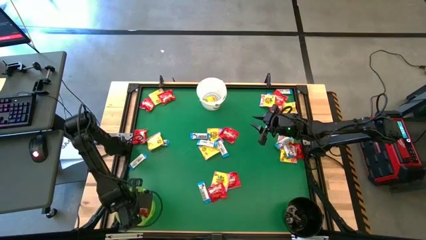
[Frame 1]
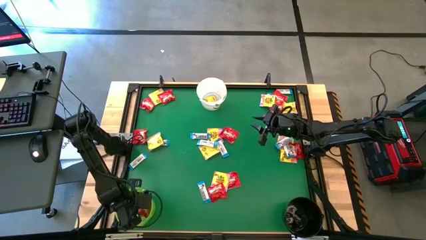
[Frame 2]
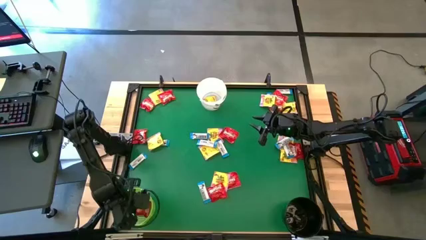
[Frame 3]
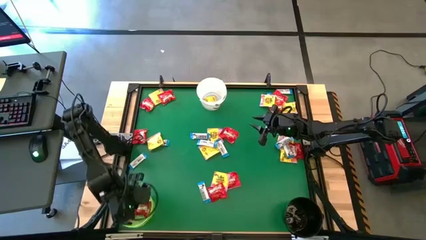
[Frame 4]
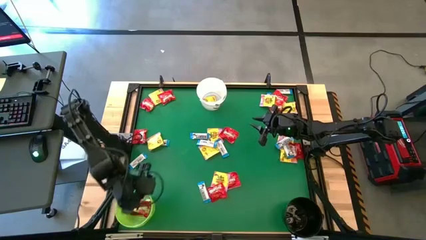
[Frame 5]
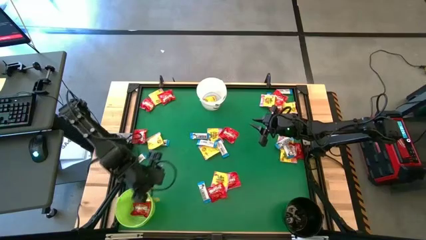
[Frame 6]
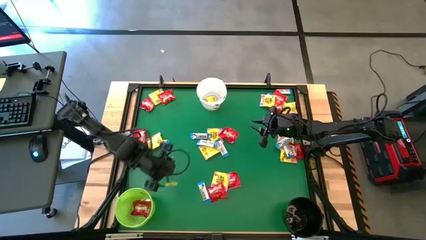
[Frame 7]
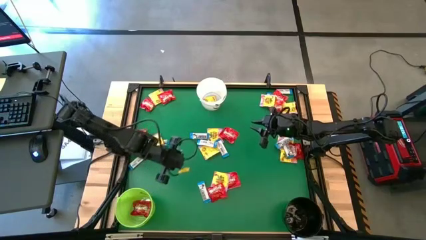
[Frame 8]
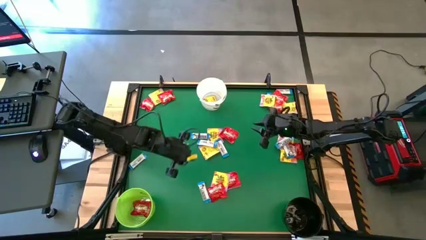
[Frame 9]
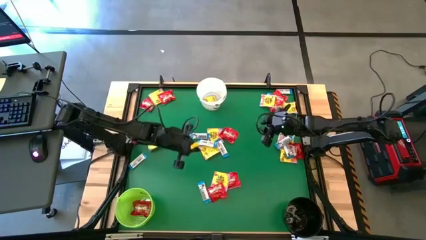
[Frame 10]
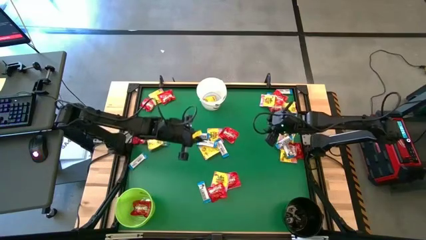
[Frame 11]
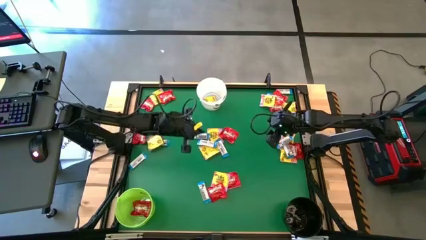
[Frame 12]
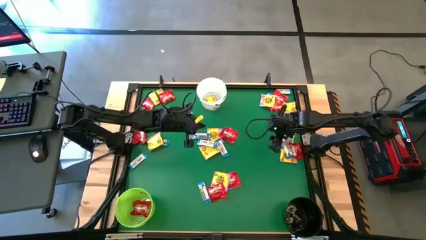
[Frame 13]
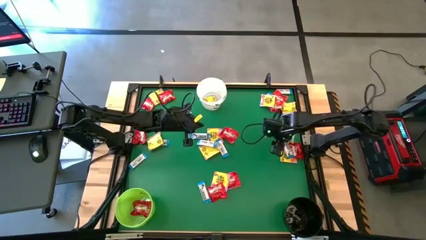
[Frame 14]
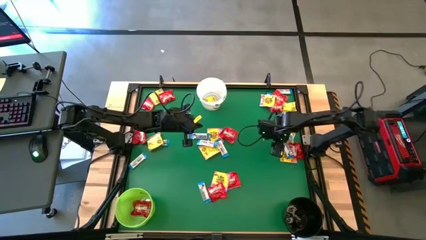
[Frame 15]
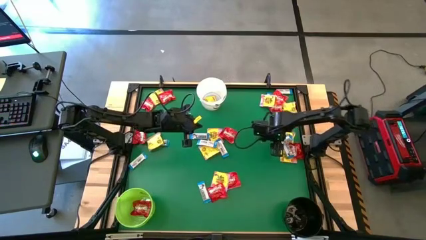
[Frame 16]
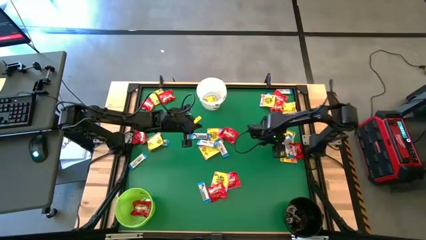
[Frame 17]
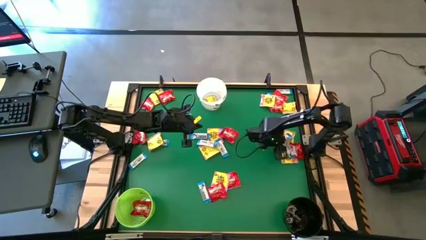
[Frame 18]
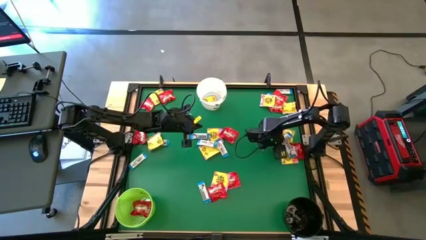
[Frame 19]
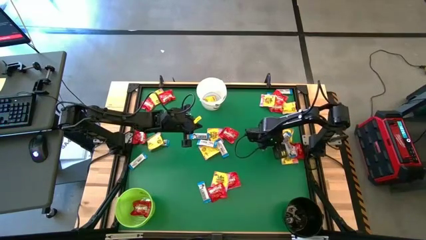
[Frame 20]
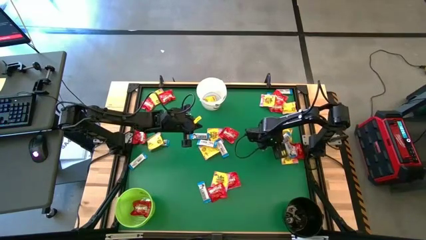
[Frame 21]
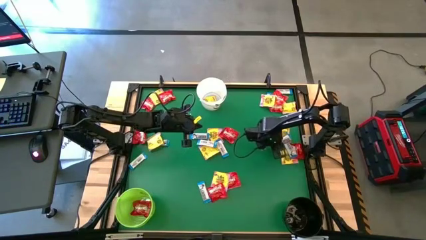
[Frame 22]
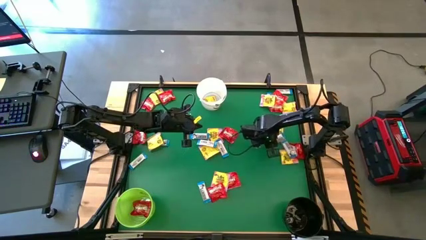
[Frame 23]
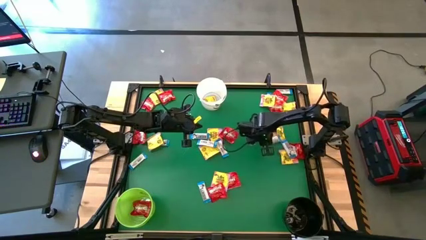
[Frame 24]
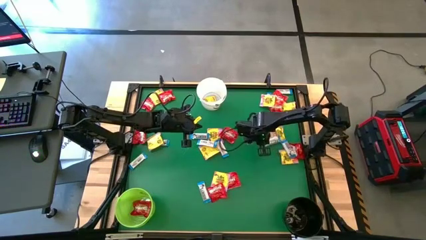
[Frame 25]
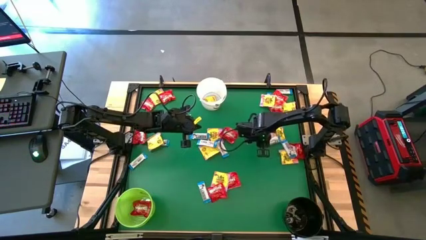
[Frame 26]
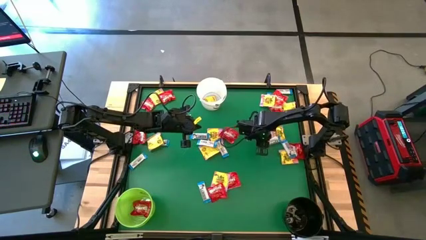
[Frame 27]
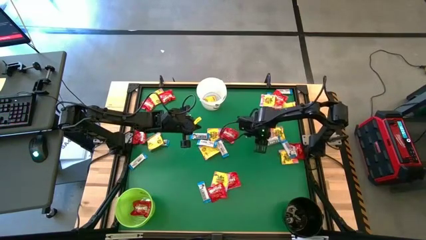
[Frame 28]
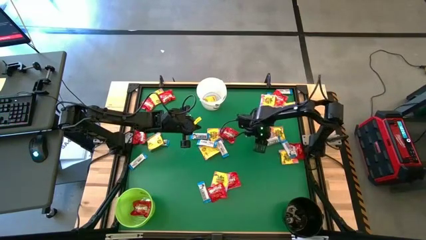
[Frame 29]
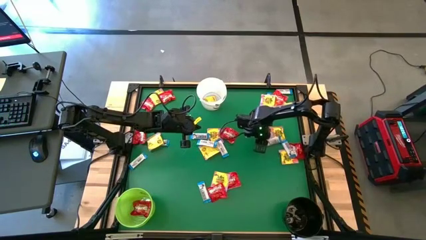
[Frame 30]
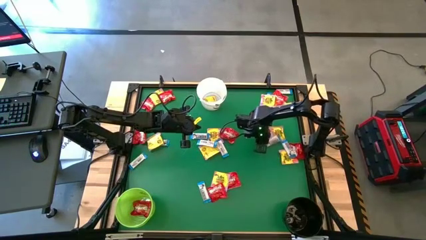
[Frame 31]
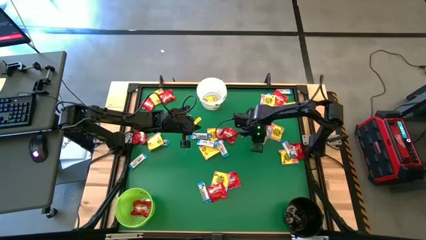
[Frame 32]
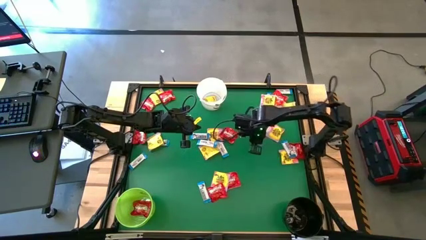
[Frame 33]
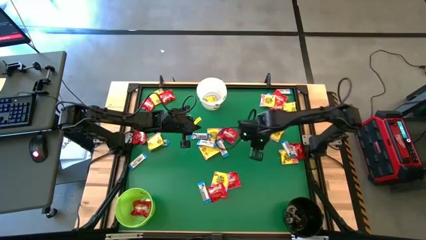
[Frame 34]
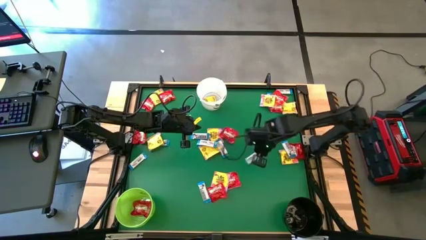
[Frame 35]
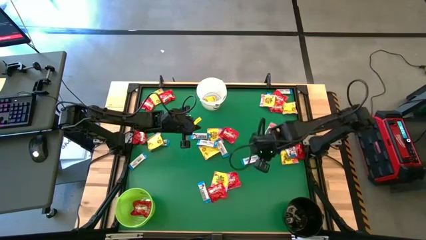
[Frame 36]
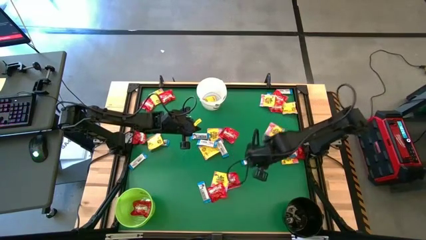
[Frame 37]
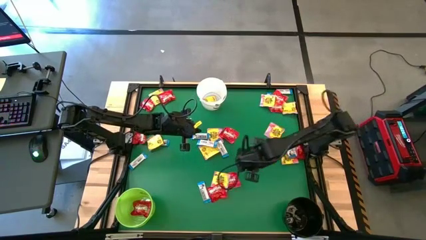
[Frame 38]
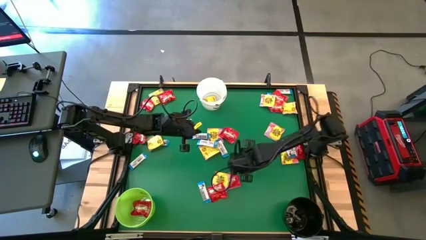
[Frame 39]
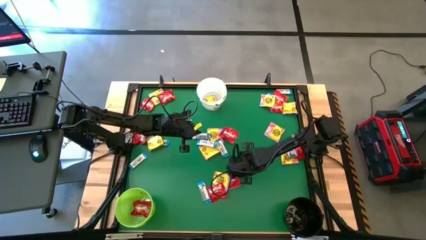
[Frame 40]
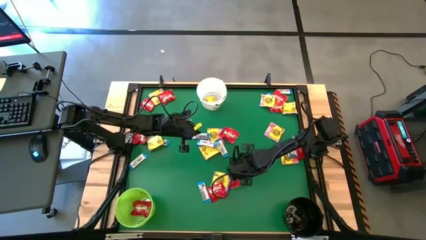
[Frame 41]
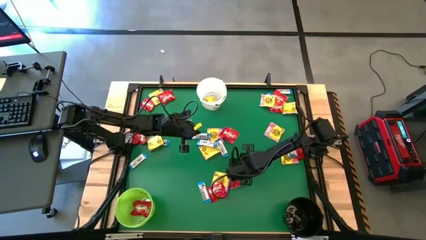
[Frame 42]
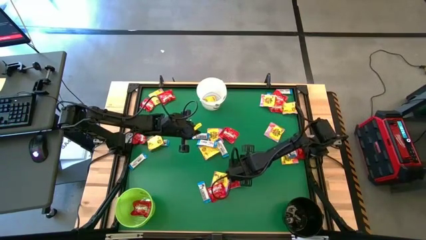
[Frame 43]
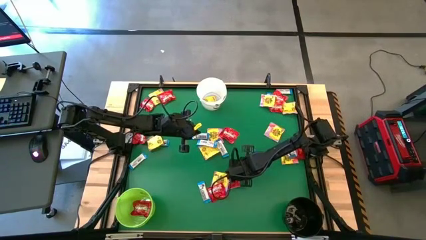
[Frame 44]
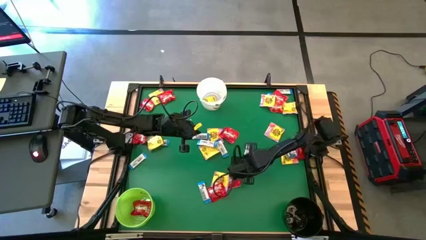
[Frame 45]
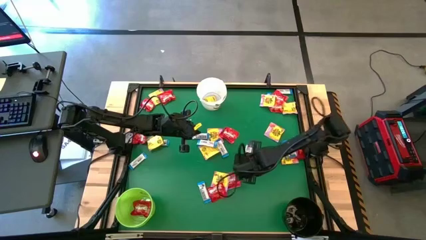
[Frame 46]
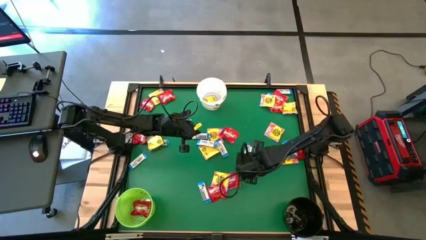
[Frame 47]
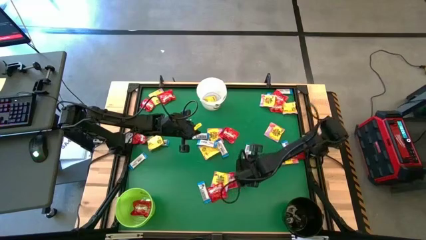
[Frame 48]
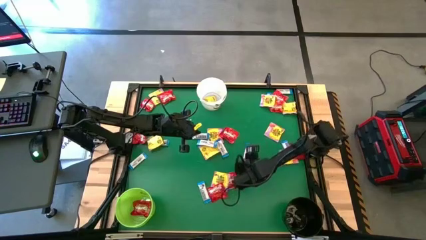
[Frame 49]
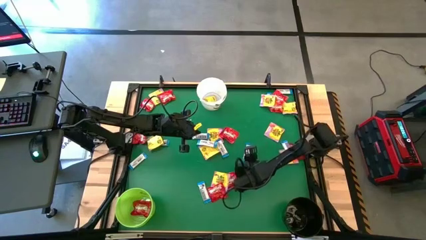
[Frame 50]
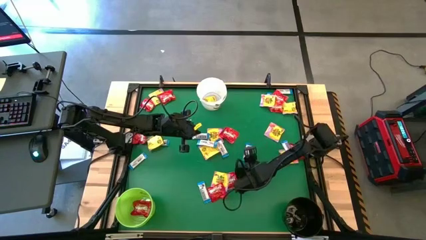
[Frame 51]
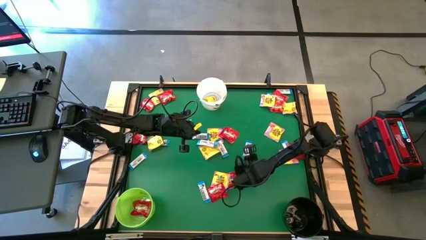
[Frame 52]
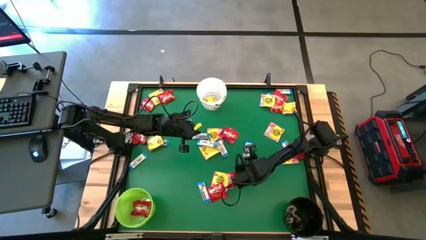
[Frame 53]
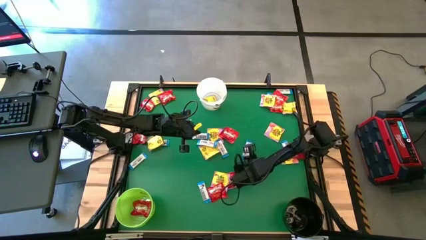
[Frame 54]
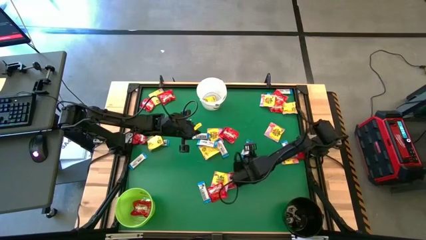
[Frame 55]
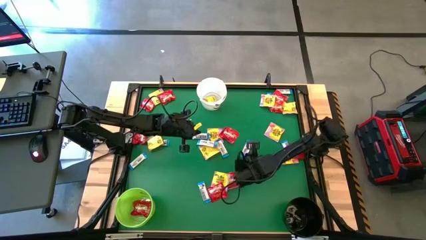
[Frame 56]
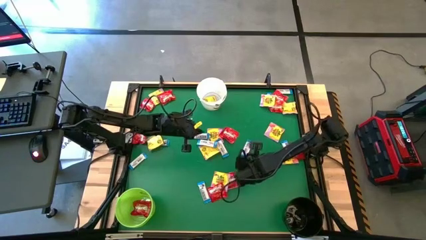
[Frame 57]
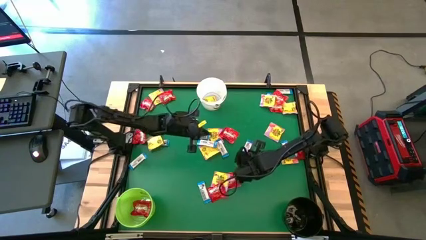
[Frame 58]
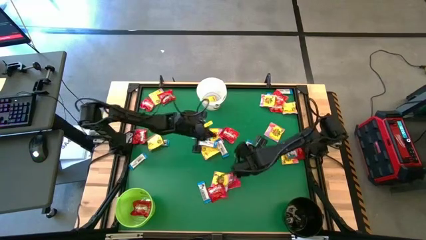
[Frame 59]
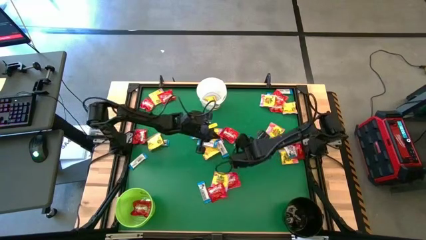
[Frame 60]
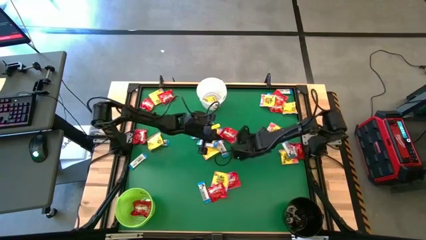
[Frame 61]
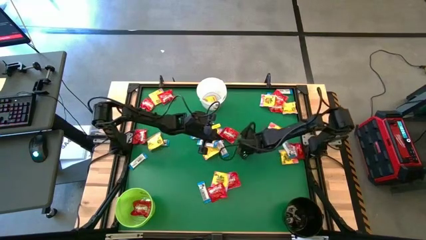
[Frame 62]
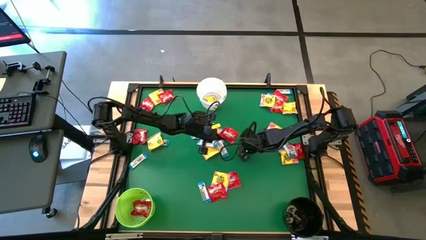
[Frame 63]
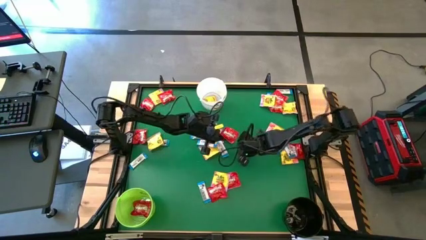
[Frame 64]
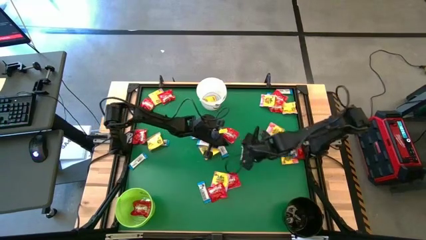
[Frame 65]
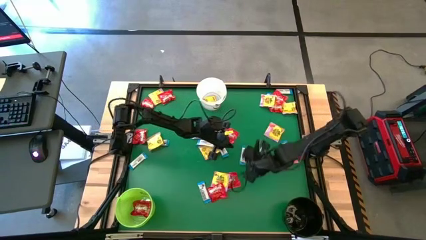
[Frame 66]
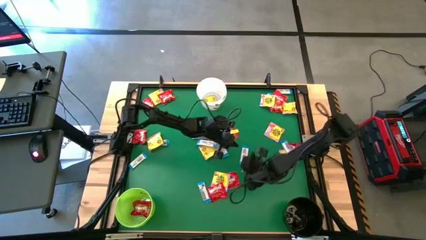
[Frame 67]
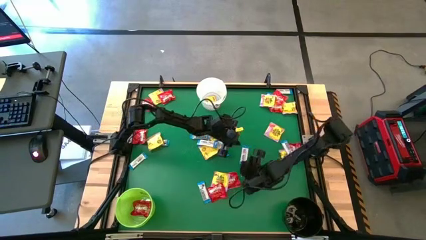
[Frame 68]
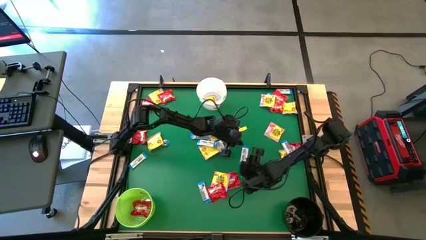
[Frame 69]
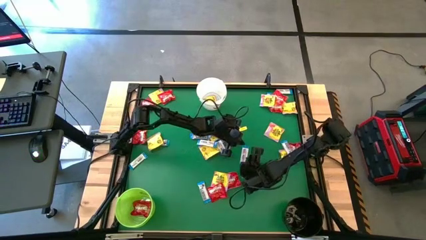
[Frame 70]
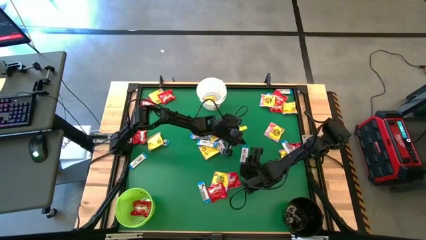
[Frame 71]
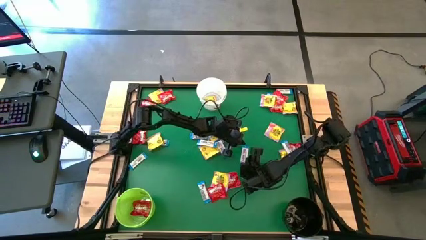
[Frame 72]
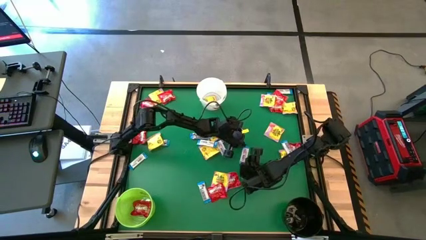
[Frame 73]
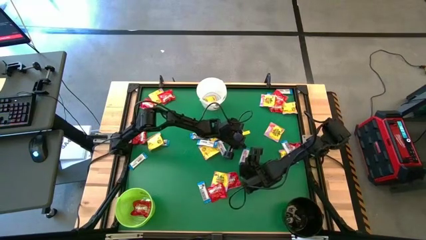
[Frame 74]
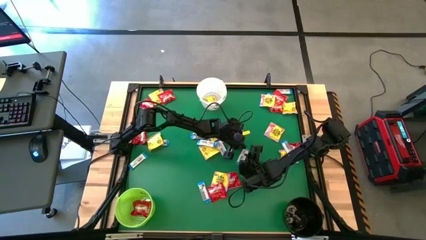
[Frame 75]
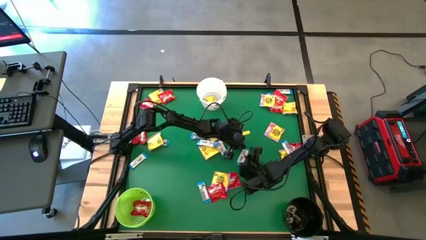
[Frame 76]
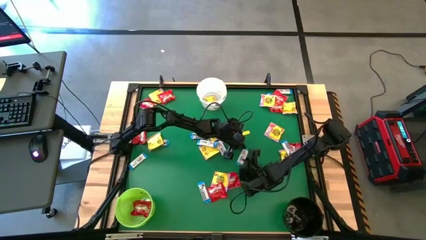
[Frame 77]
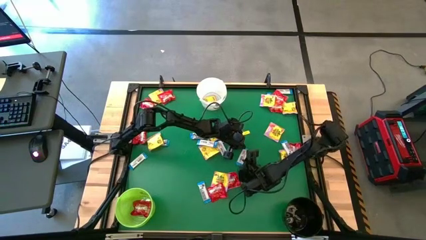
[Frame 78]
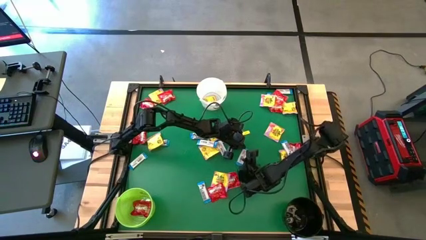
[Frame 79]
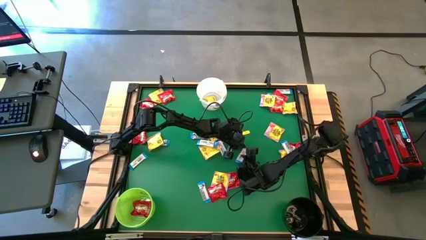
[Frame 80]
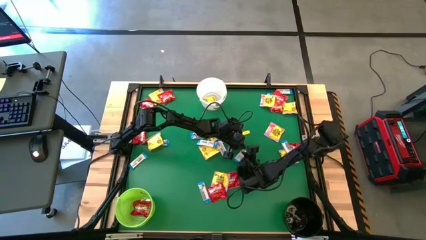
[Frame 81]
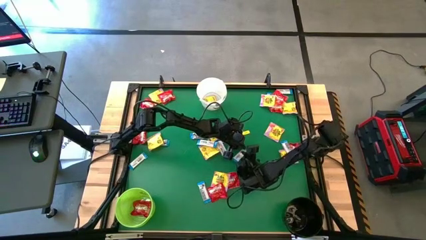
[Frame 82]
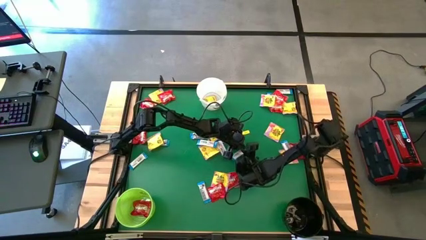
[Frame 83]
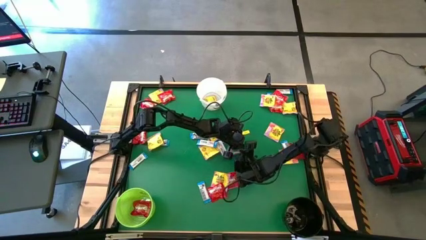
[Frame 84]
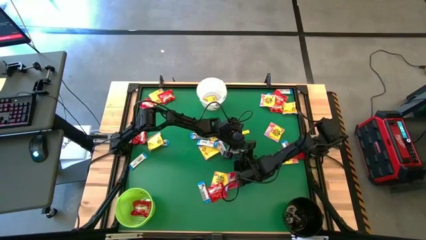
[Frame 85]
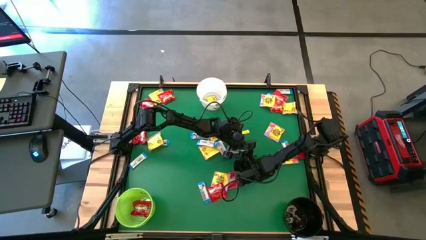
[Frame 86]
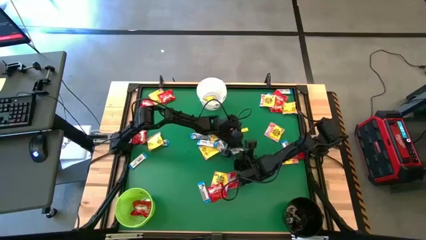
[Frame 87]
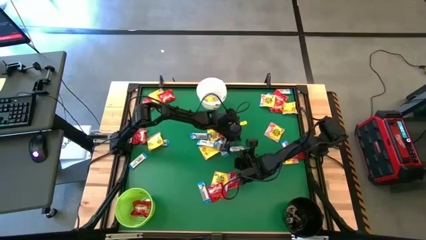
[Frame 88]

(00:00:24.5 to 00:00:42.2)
Task: Sort candy by brand, put in halloween buckets
Put the white candy into the black bucket
